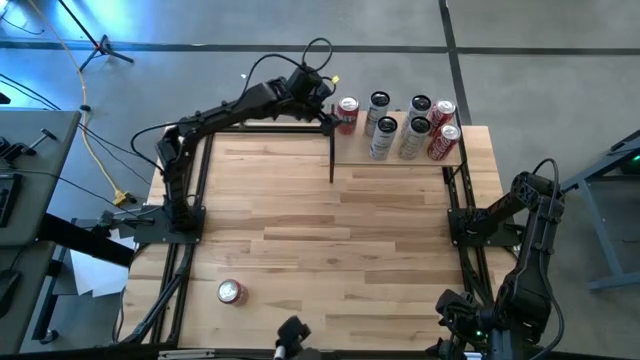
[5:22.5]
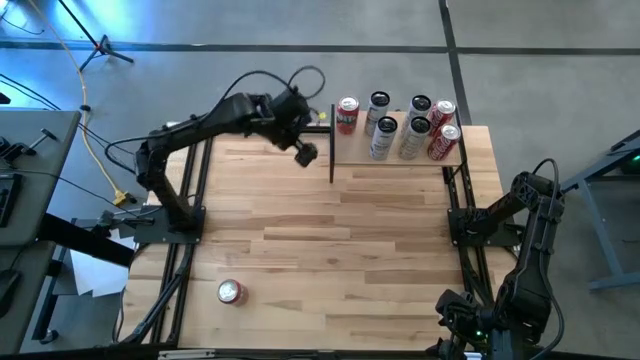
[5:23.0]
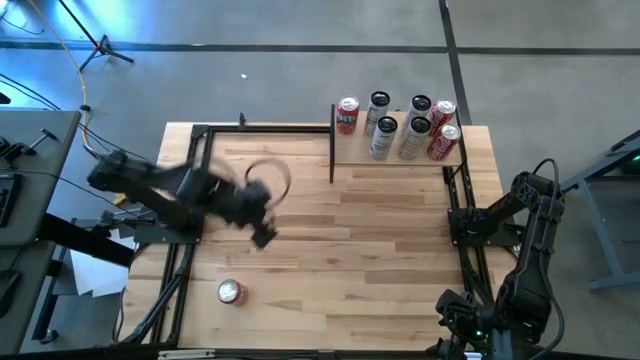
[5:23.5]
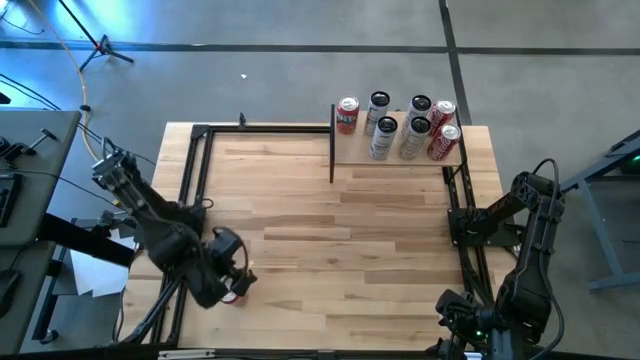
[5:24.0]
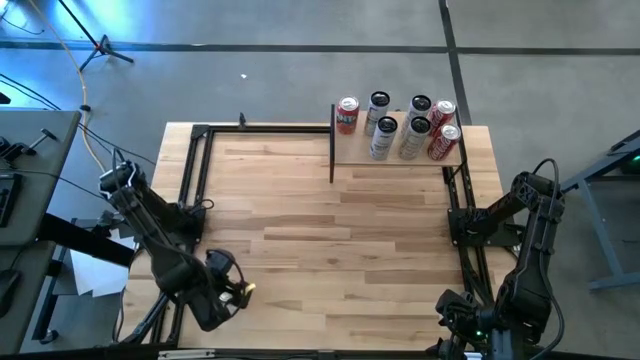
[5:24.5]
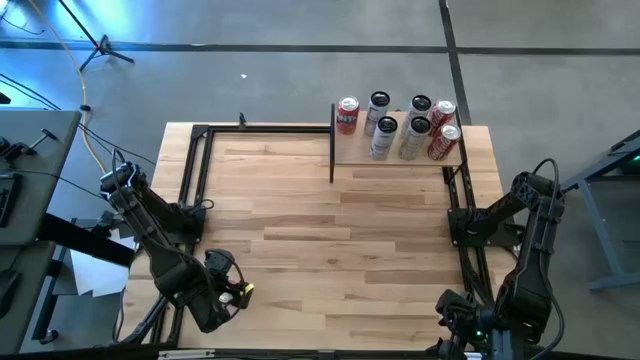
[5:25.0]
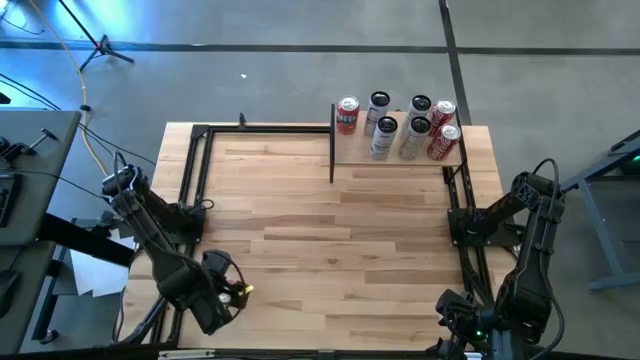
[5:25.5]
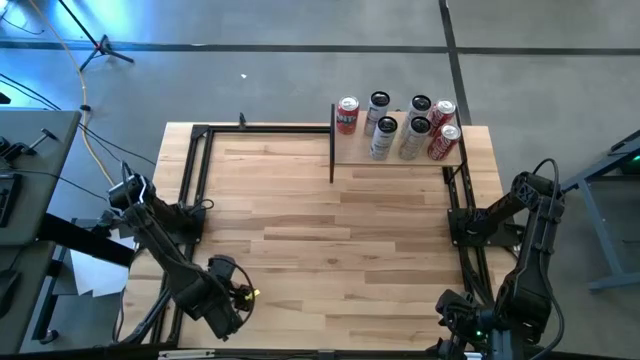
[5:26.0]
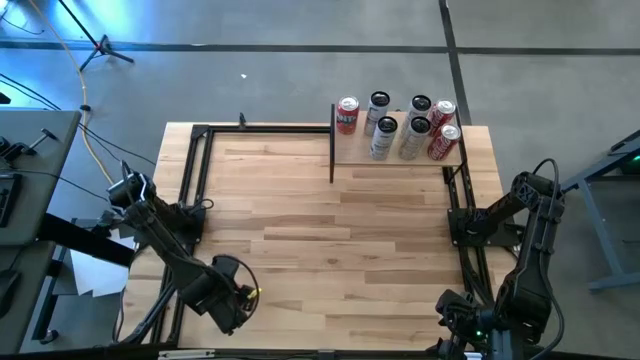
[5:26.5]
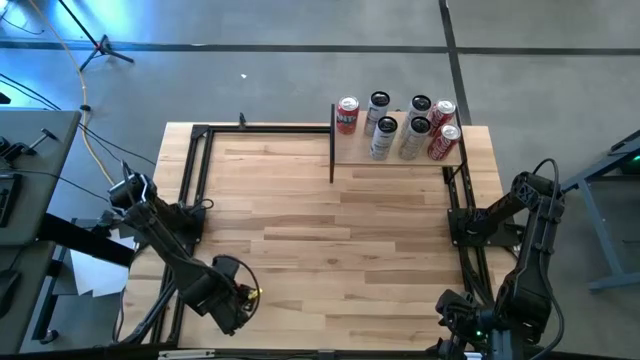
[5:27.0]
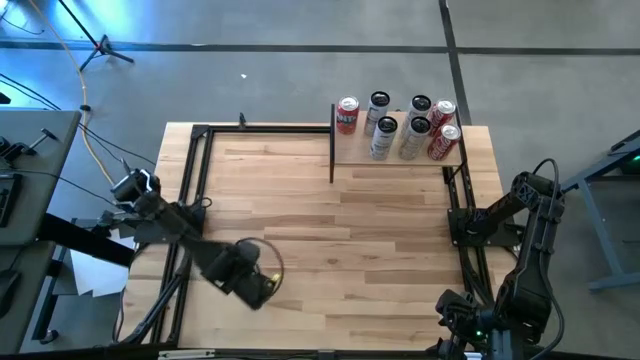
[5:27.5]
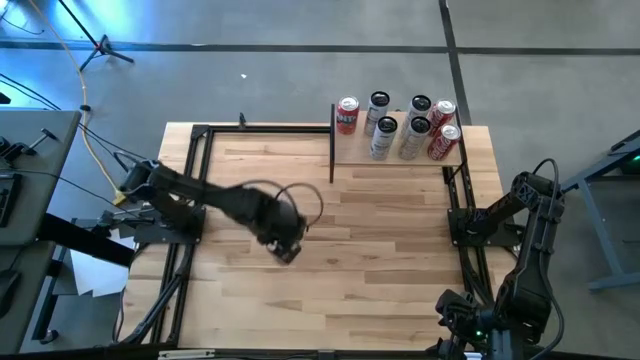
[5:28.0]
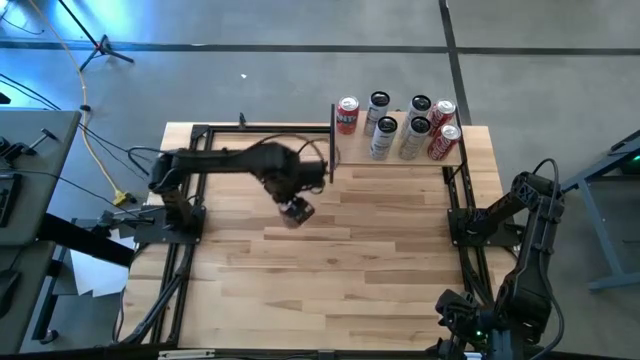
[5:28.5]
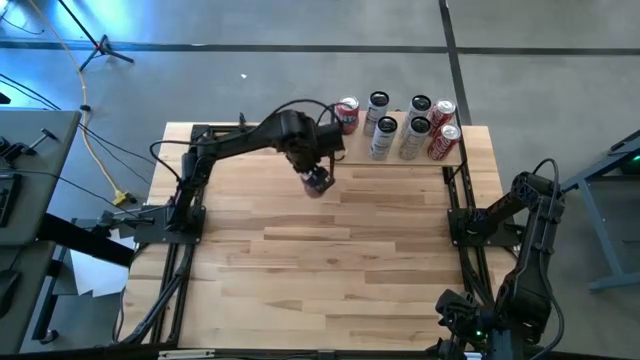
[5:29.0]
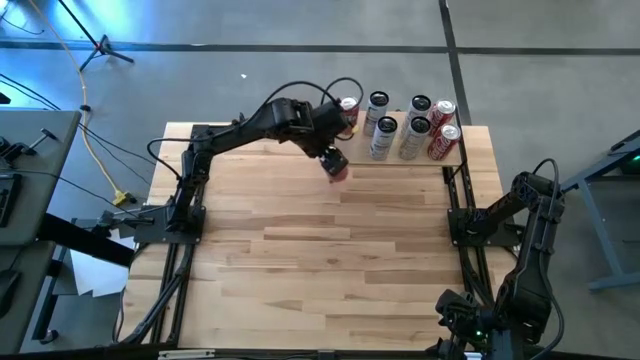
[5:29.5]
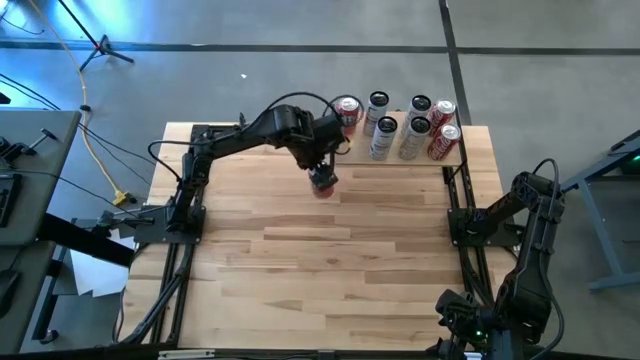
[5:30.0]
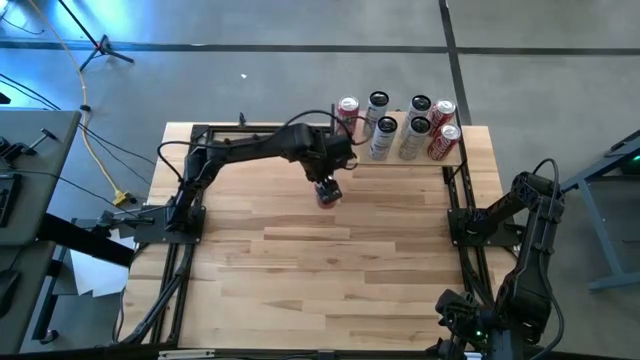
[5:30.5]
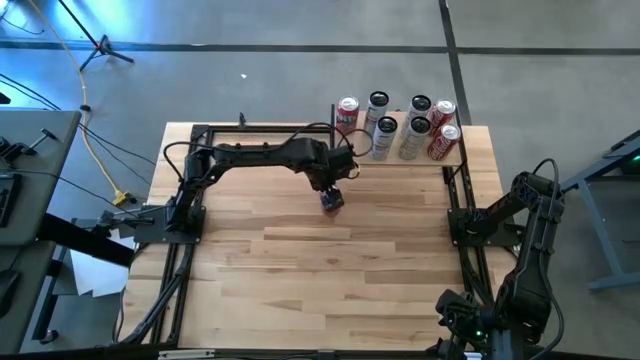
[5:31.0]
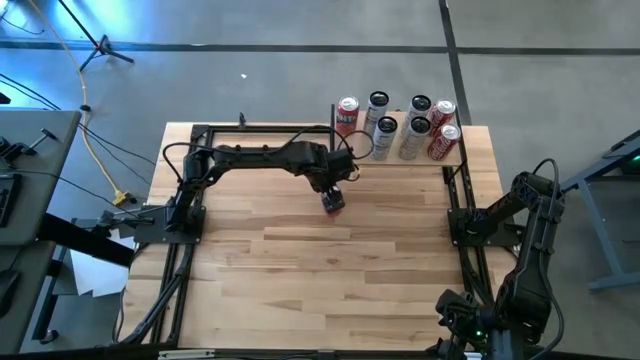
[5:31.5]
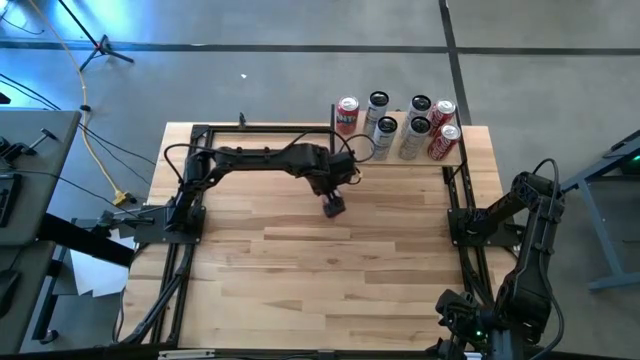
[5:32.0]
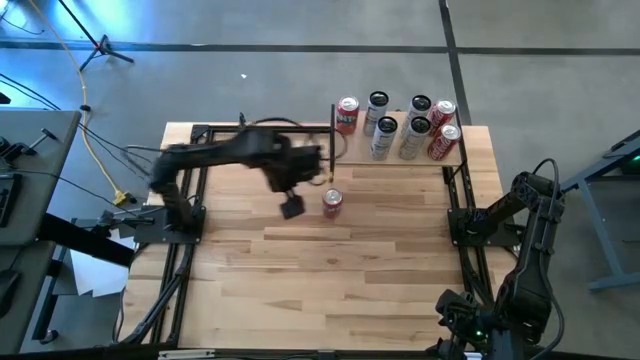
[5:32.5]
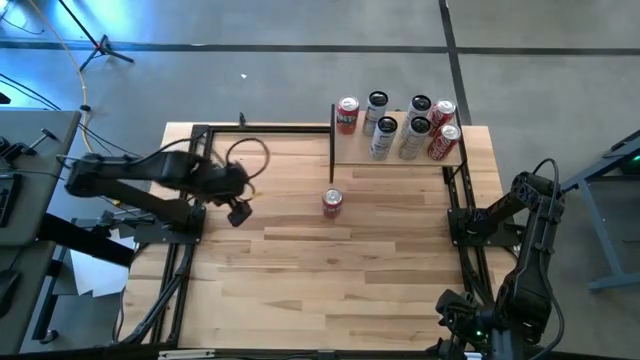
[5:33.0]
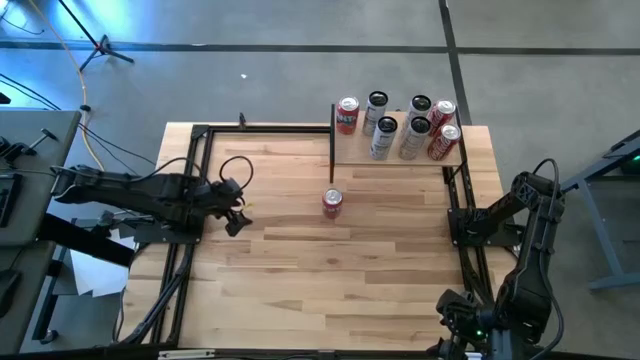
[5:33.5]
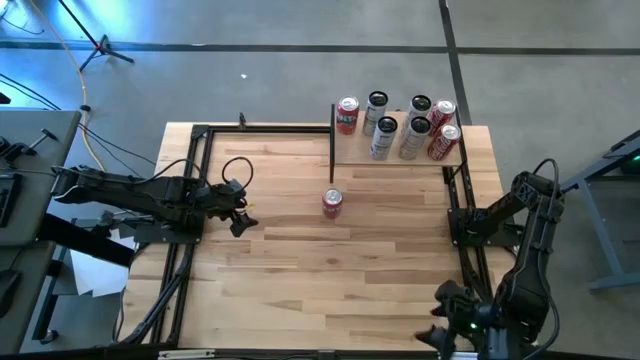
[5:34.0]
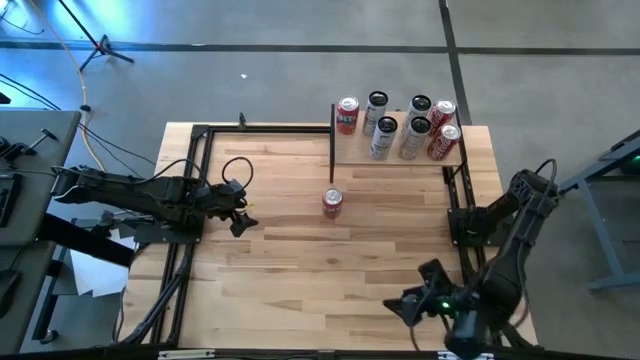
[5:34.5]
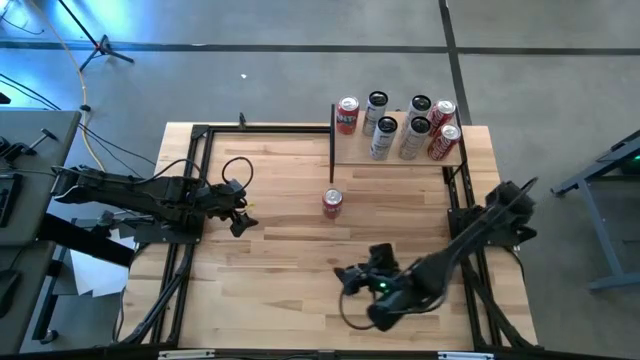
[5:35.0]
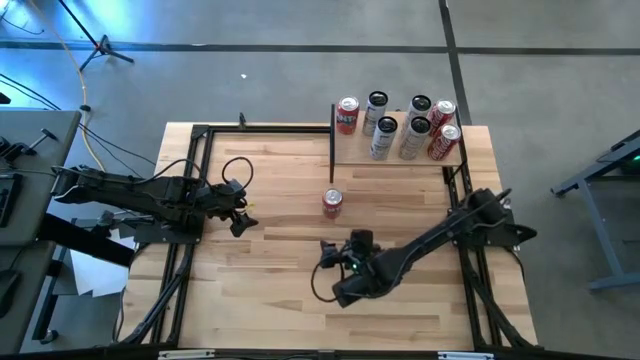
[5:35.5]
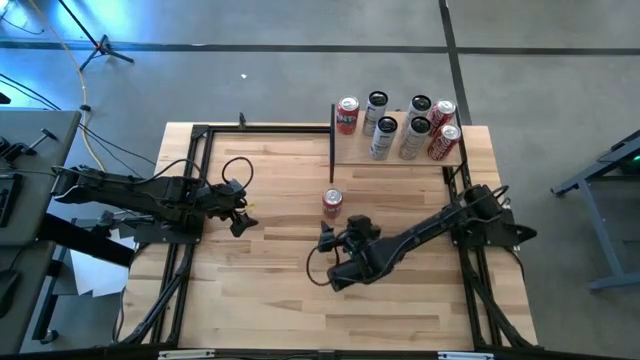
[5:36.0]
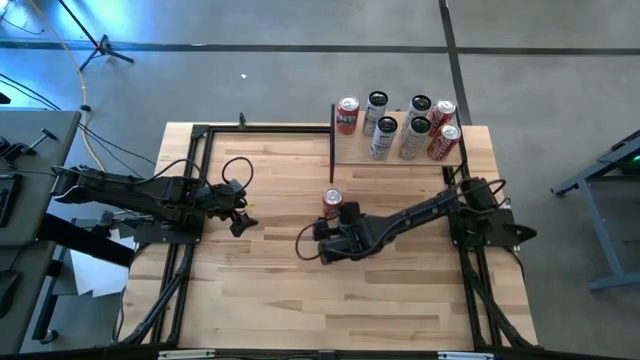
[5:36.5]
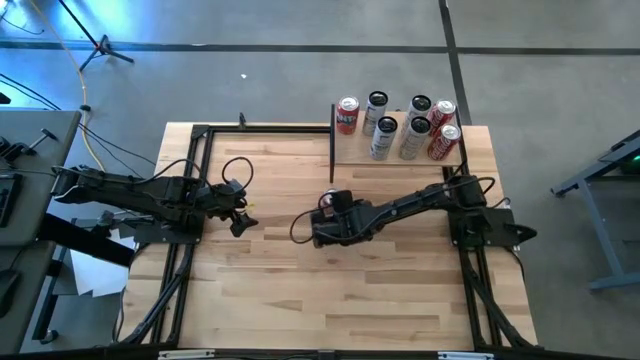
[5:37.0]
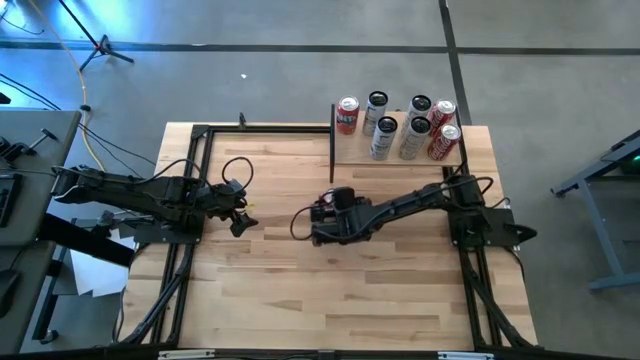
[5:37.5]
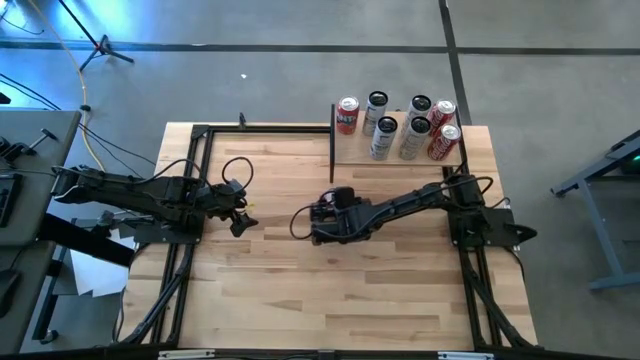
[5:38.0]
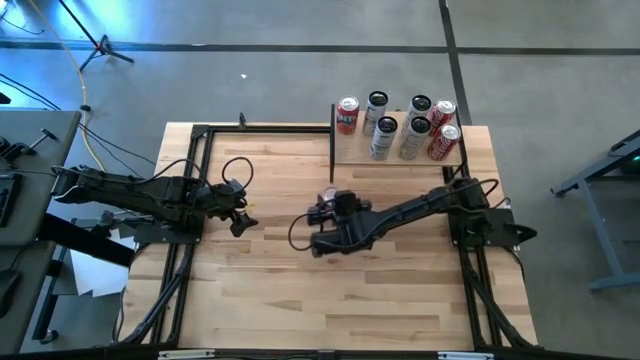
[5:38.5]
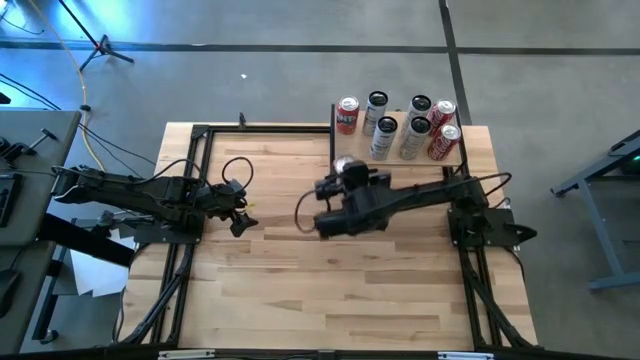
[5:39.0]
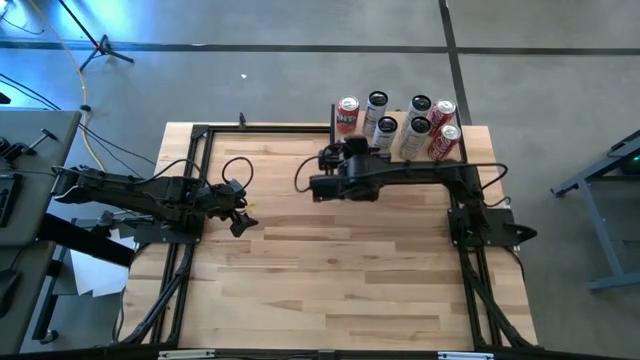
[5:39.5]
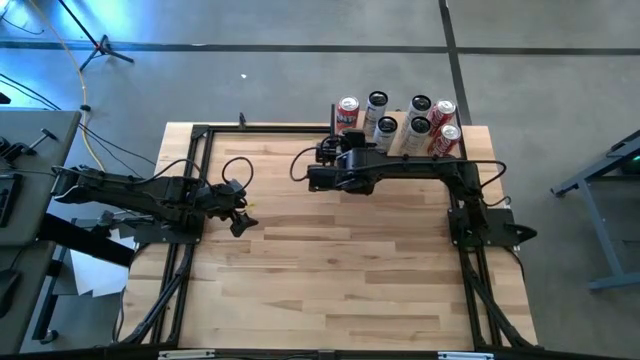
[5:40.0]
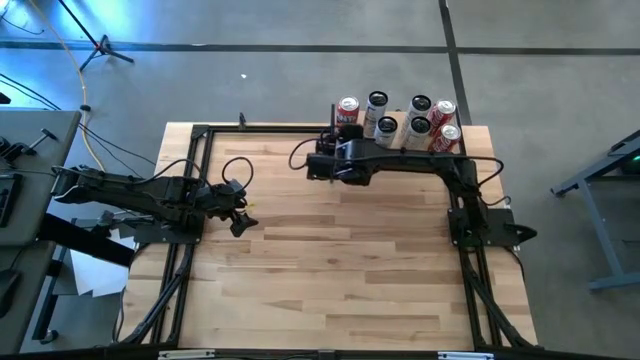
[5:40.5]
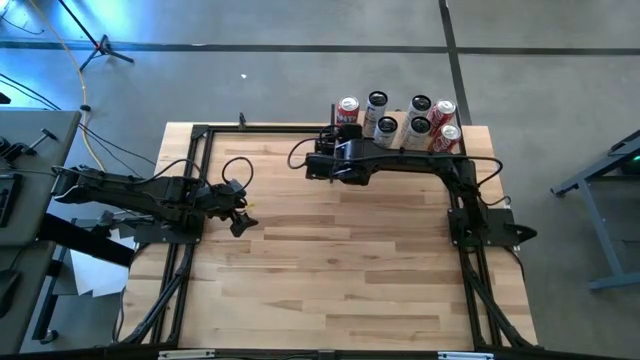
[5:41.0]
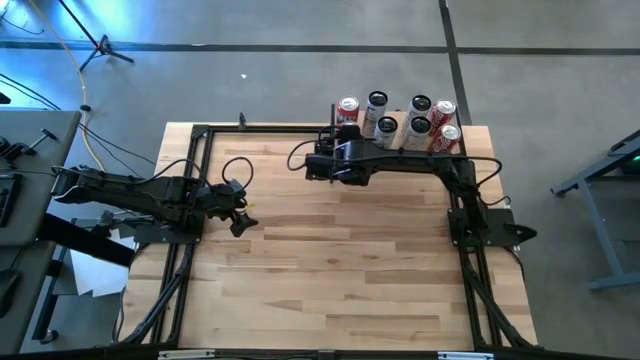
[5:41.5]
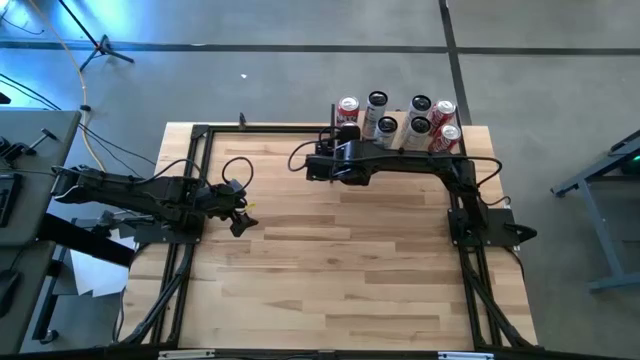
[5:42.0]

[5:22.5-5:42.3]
Task: Place canned beverage on shelf
Put the orange soda can on the shelf aligned with the other orange soda can

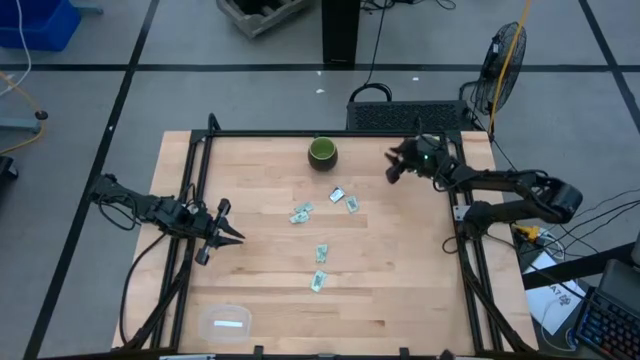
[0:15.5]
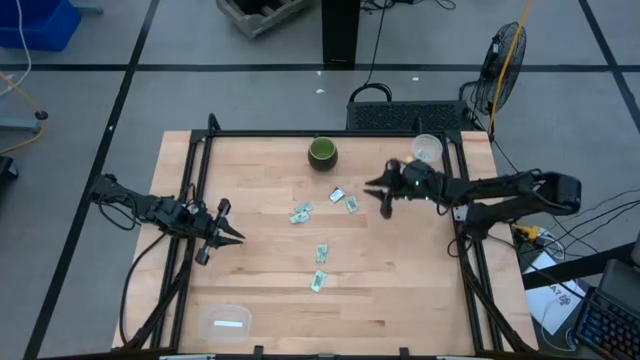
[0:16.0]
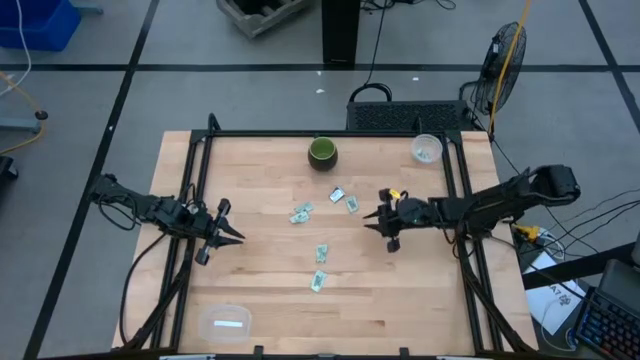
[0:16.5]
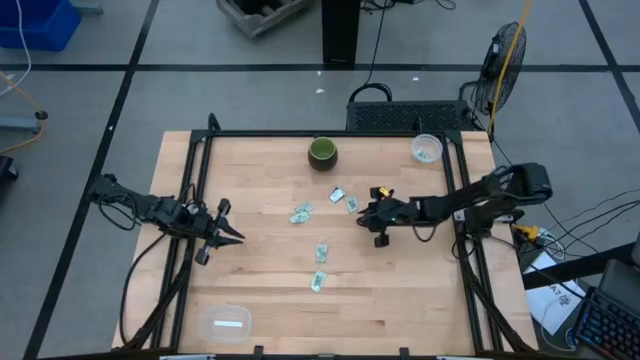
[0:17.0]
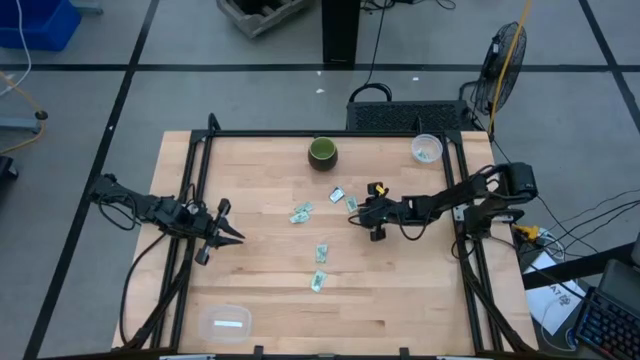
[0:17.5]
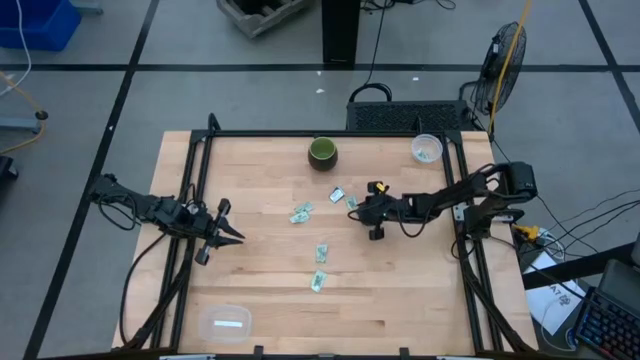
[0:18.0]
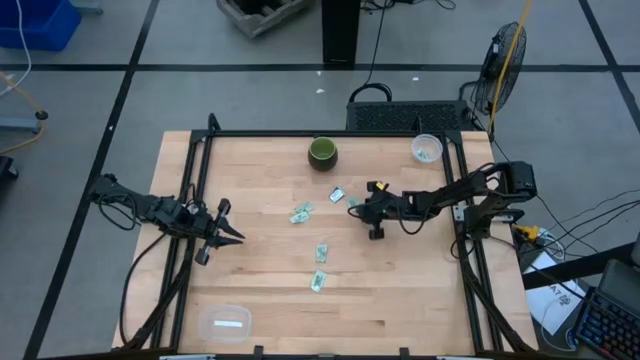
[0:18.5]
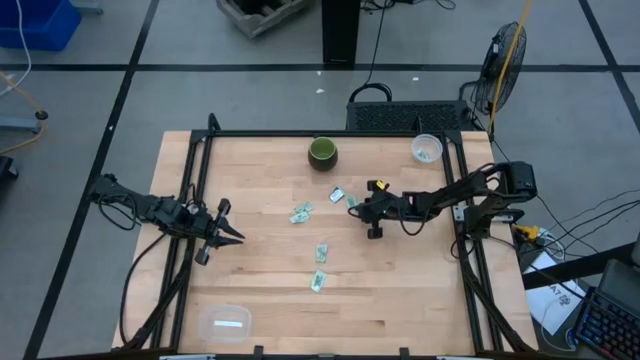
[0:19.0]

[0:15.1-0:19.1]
Task: Pick and place items into bin
Put the stevia packet into the top transparent bin
